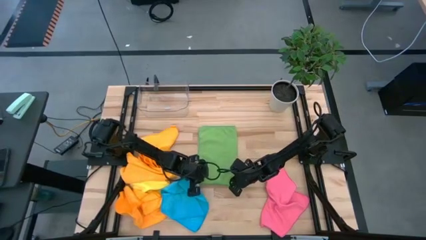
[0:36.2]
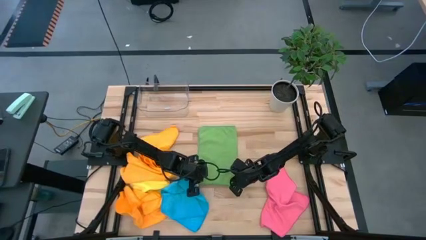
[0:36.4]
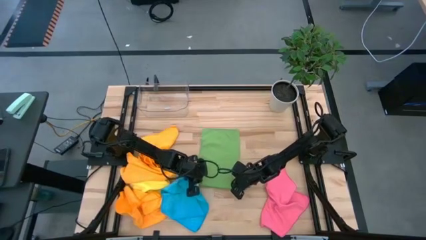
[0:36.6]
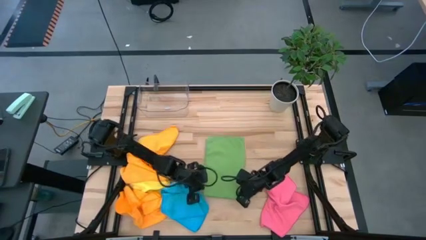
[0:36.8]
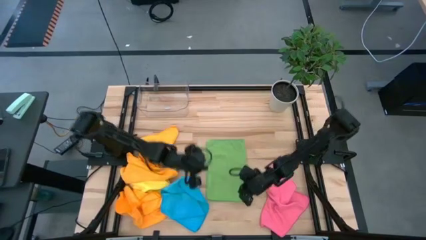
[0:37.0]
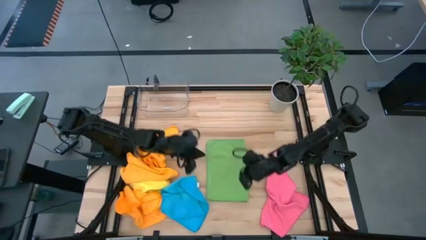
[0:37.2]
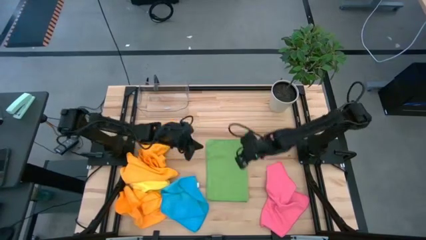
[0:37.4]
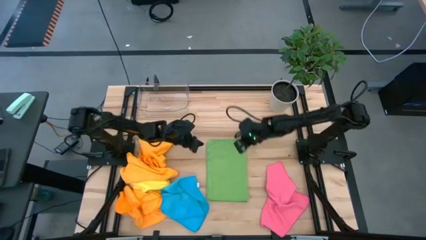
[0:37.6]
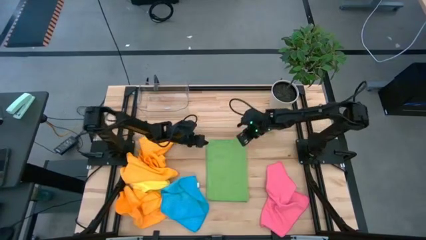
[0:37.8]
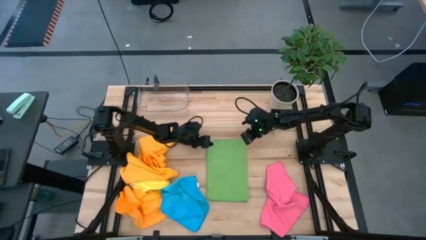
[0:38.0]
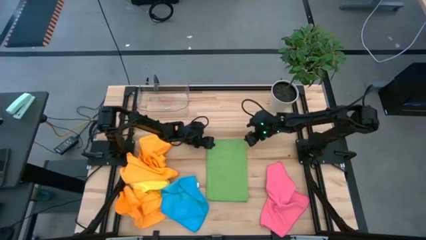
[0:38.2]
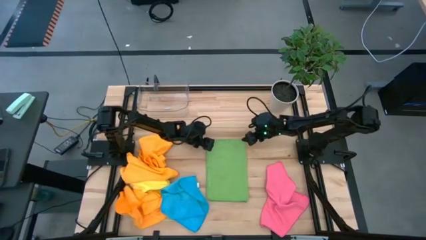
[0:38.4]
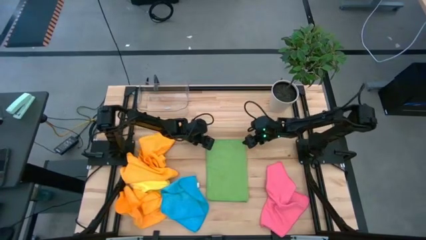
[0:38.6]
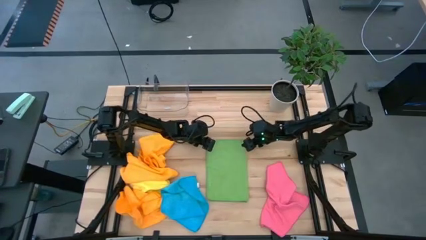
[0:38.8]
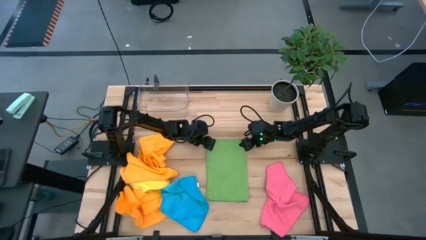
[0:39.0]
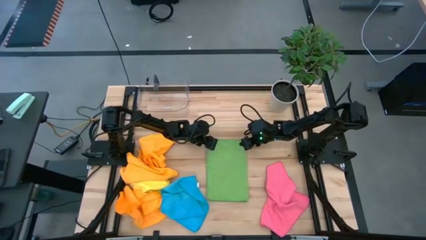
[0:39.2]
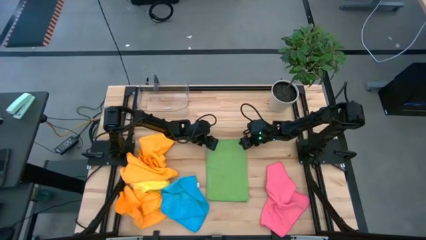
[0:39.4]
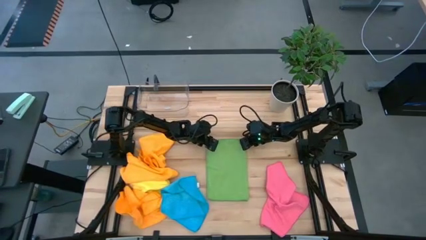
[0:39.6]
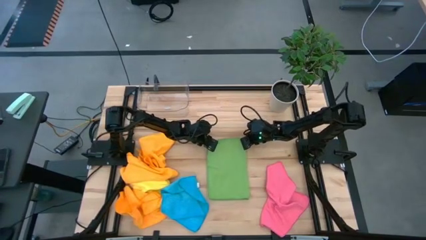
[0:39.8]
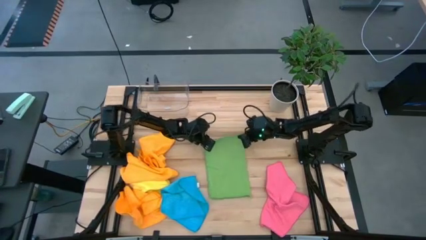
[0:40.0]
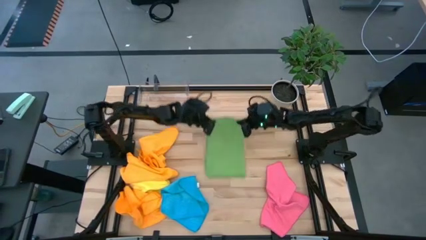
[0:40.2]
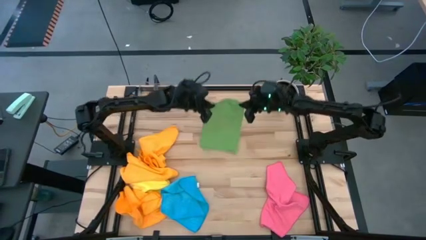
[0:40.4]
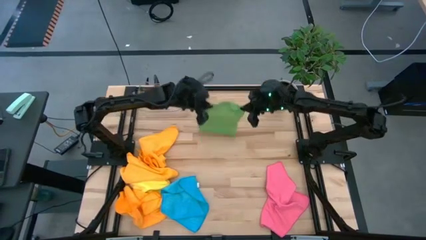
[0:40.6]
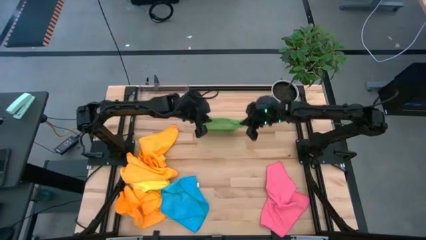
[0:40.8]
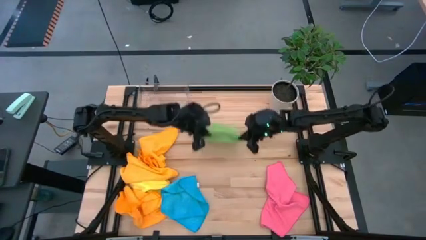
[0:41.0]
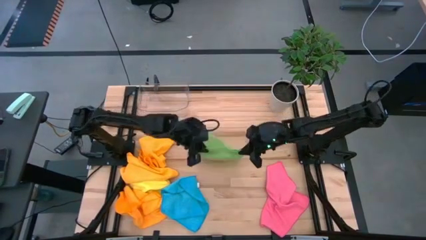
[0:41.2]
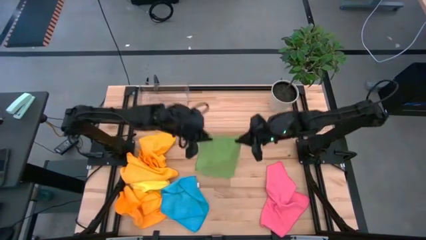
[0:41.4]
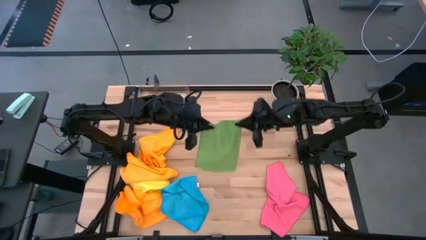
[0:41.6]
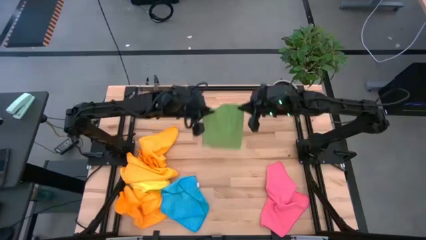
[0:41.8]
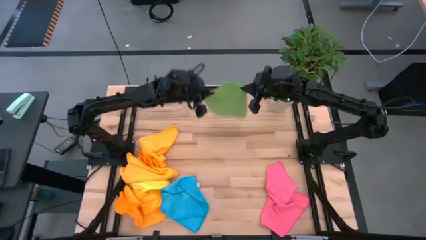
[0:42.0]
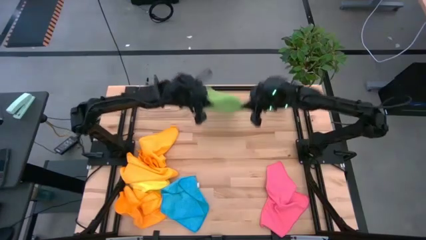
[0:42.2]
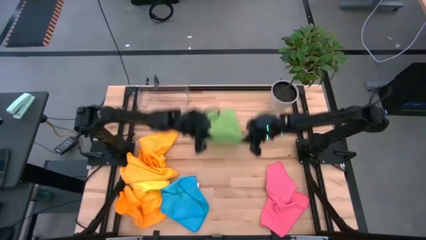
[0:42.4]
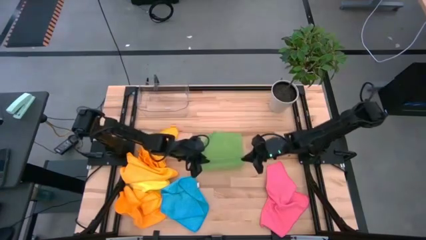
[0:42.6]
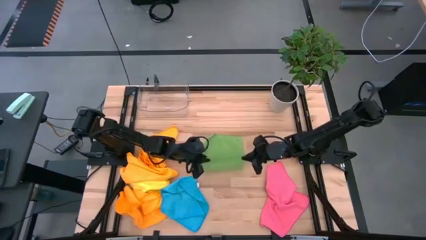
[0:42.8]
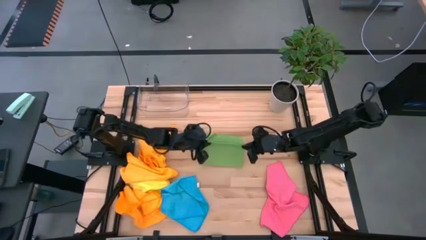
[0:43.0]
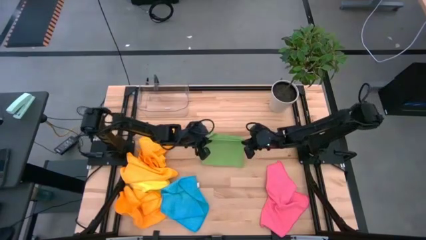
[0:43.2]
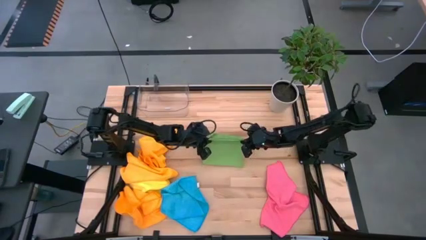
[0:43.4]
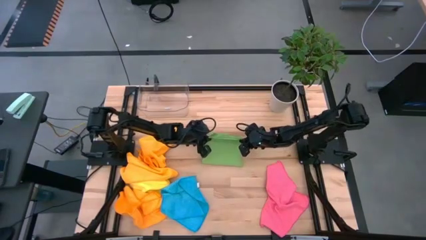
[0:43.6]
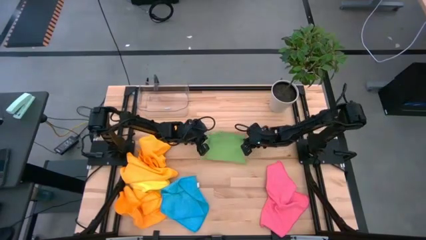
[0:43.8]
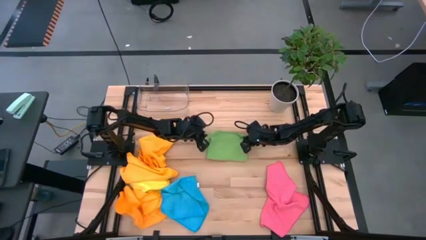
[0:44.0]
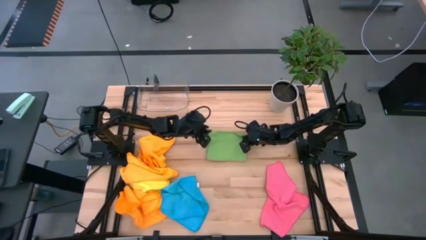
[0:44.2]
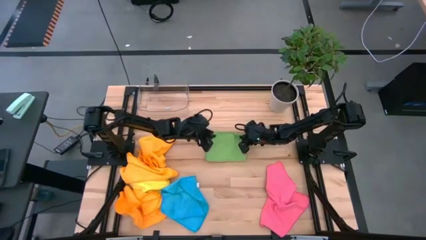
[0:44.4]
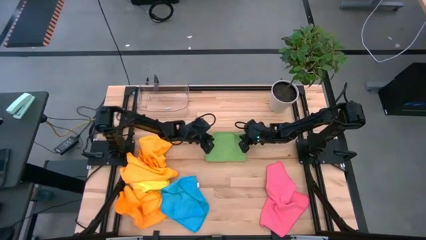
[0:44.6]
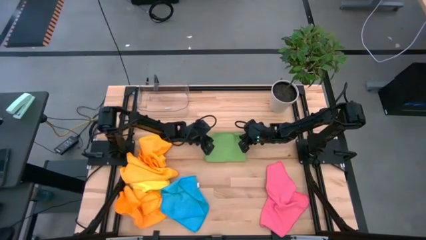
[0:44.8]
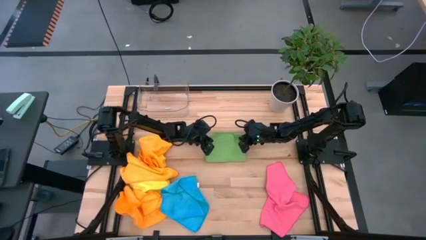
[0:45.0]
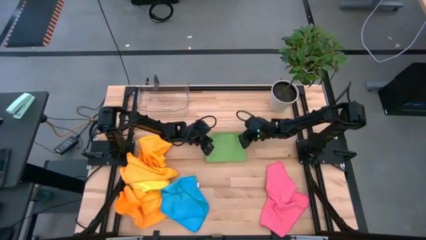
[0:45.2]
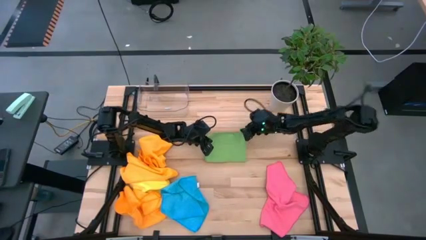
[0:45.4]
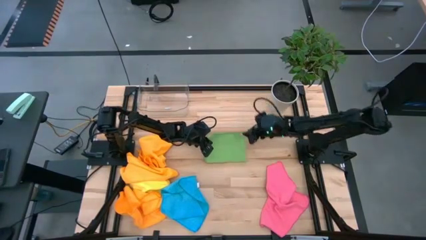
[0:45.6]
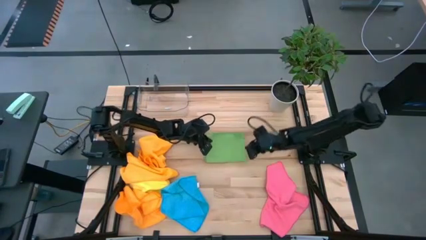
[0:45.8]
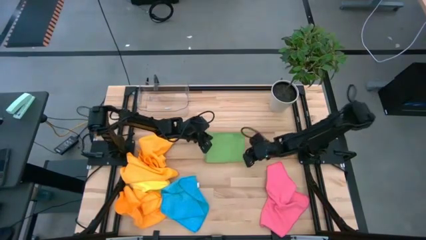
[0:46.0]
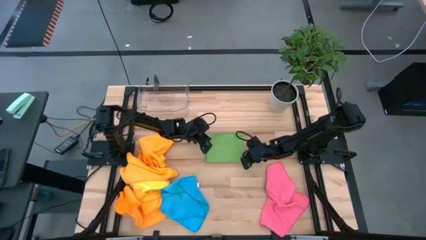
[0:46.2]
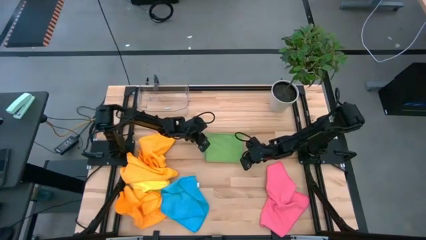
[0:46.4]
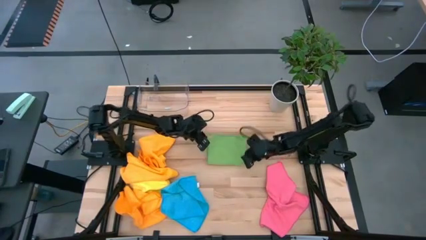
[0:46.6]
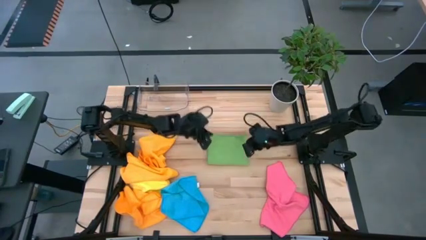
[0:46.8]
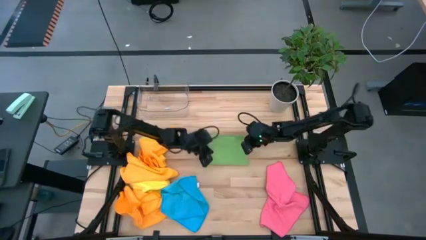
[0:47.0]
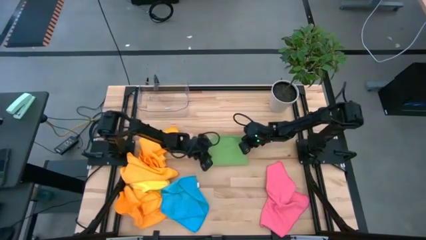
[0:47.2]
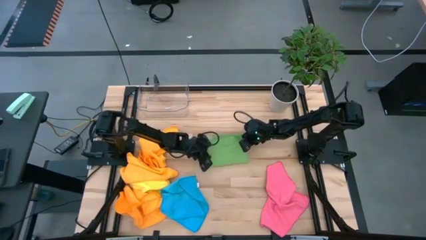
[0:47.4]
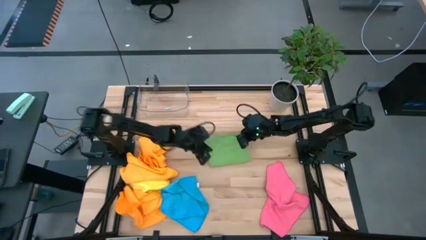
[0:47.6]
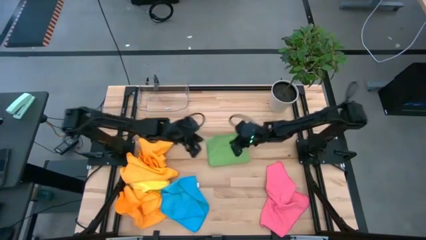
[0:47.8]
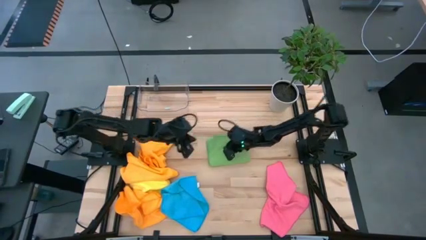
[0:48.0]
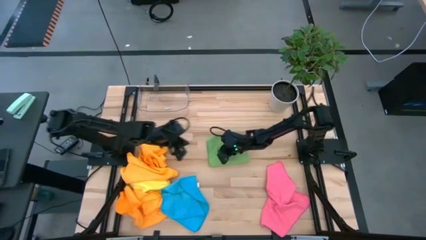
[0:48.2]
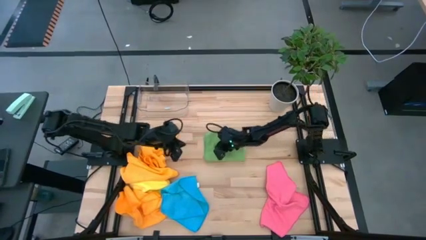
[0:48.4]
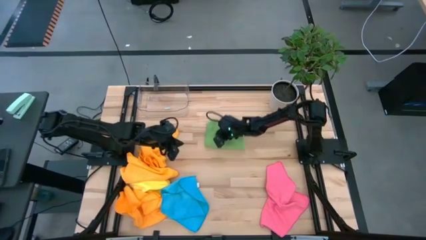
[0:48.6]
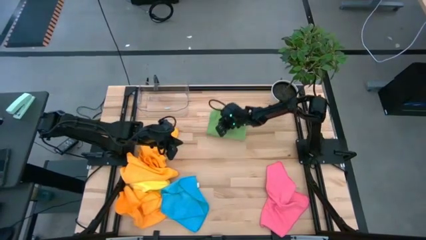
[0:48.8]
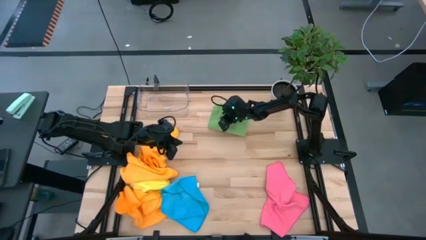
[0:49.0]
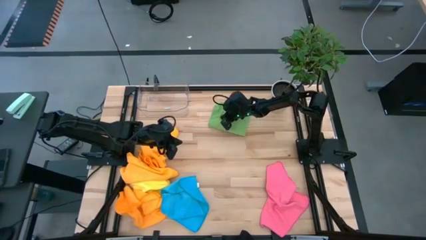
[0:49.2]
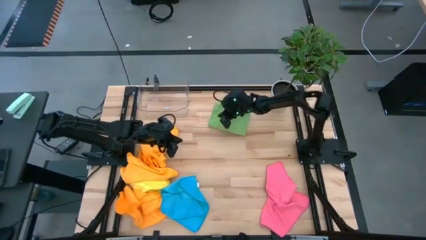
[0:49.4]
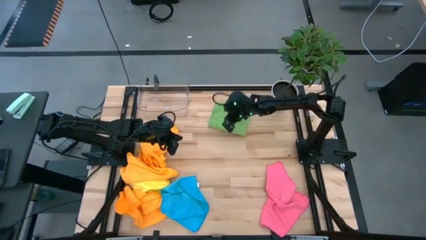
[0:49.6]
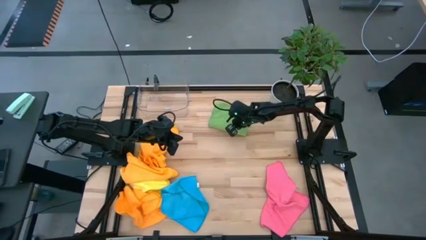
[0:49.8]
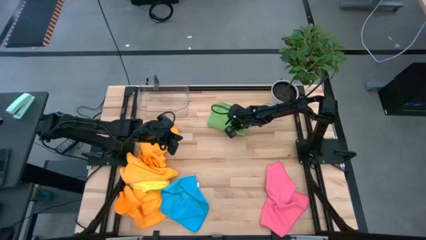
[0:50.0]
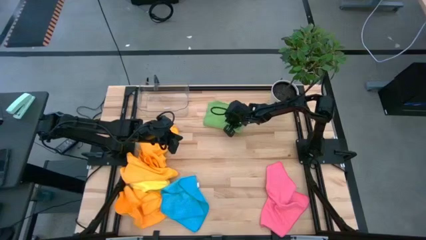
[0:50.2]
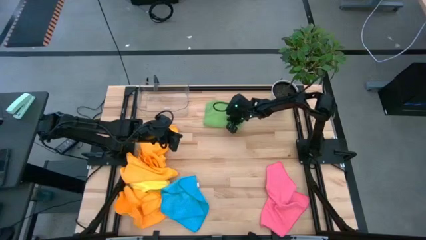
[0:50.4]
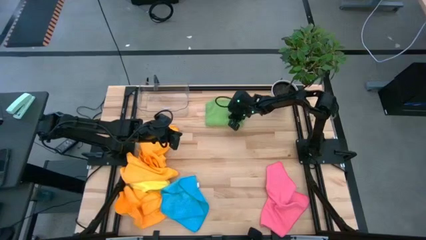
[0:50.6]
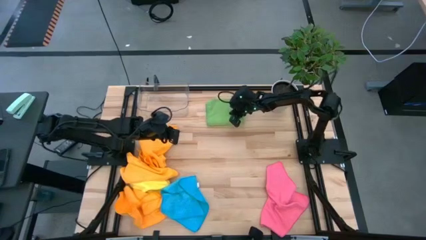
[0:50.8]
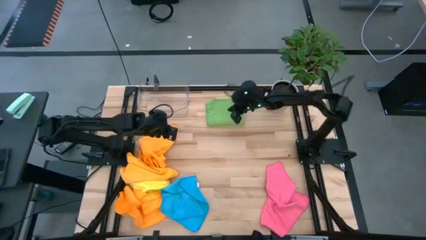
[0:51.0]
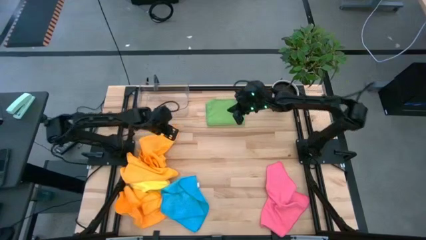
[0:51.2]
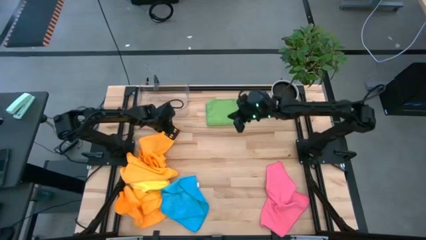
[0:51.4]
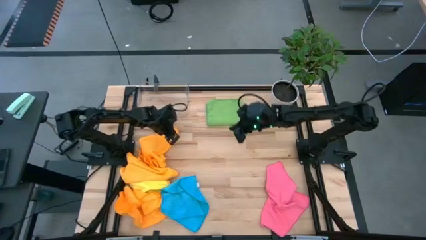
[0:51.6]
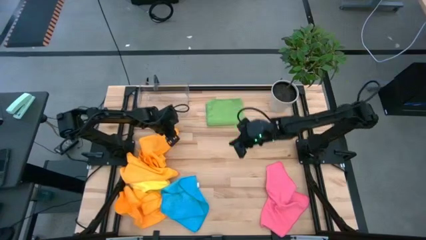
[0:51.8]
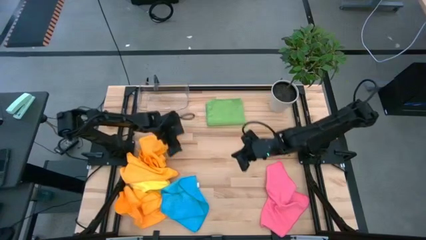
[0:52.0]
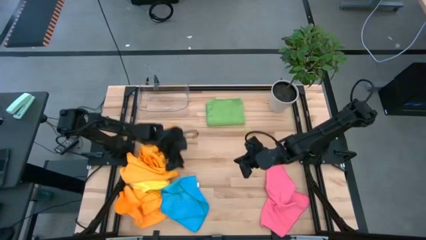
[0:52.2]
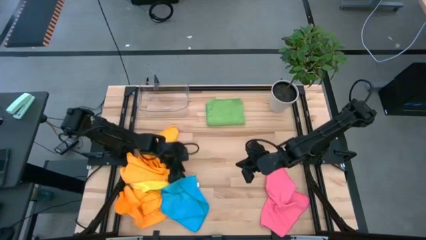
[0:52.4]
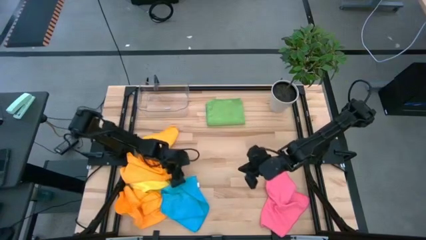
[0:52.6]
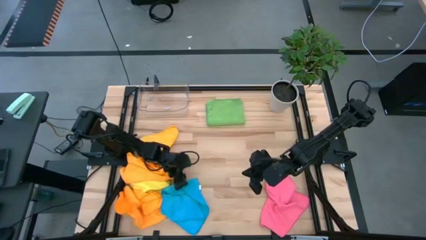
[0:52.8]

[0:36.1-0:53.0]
Task: Fold microfiber towels
Fold the green towel
